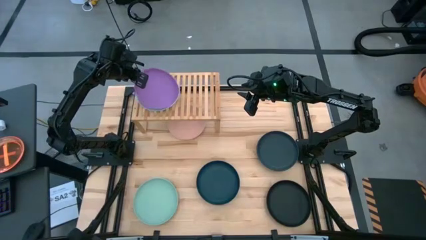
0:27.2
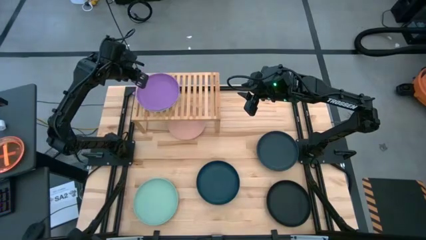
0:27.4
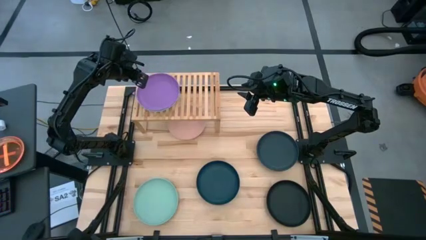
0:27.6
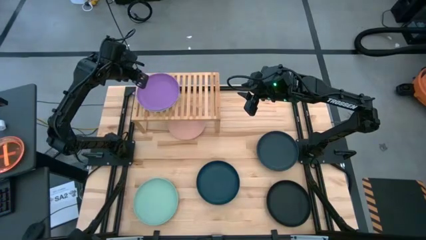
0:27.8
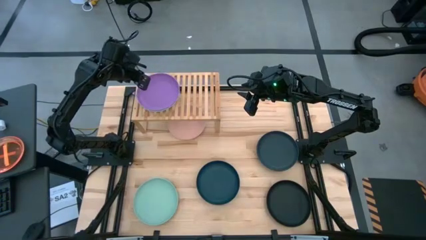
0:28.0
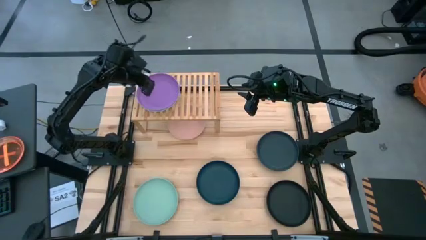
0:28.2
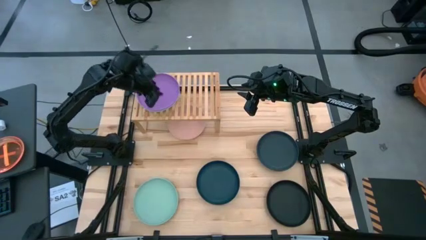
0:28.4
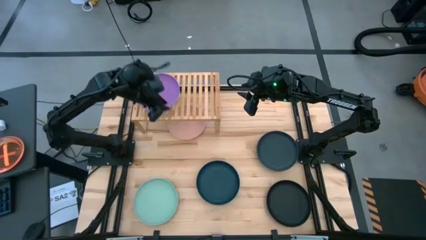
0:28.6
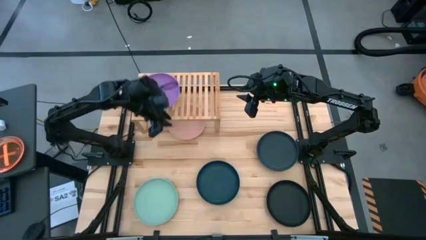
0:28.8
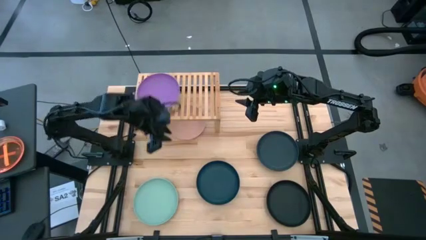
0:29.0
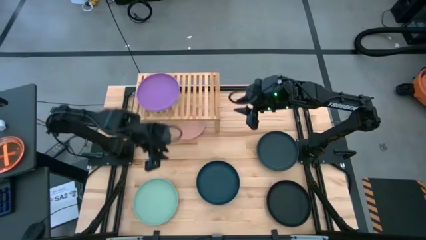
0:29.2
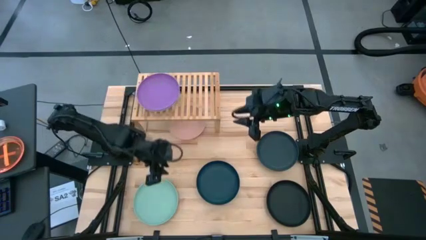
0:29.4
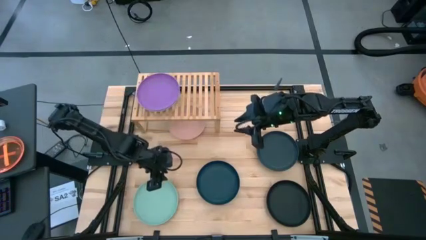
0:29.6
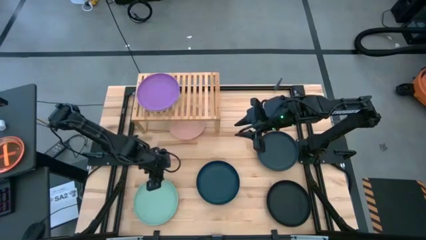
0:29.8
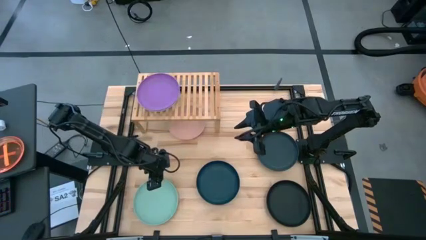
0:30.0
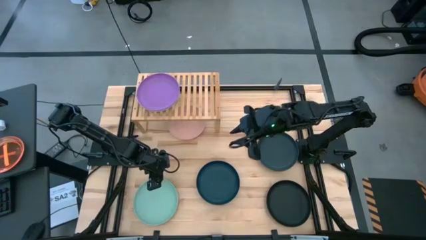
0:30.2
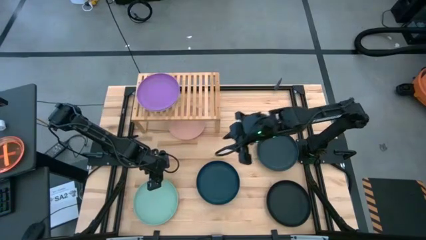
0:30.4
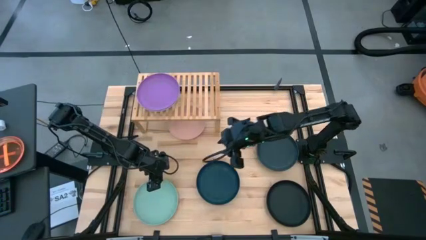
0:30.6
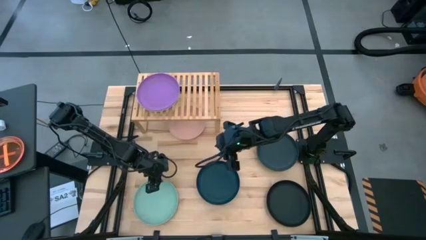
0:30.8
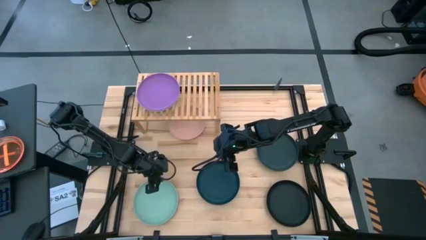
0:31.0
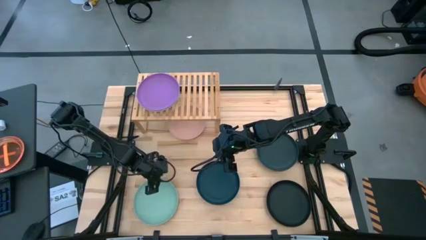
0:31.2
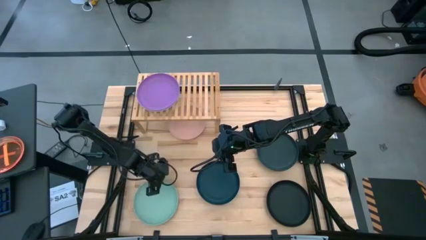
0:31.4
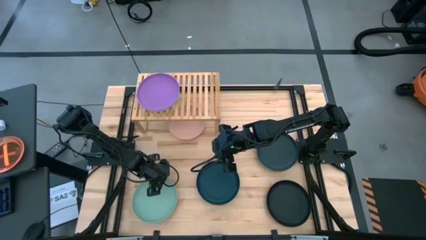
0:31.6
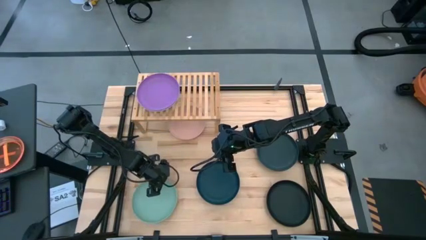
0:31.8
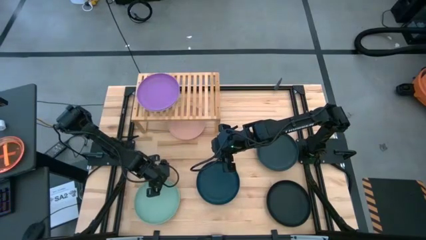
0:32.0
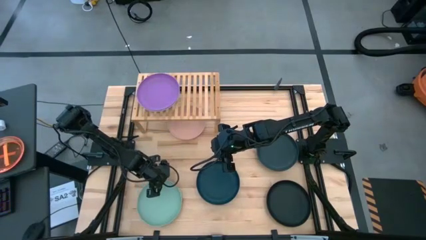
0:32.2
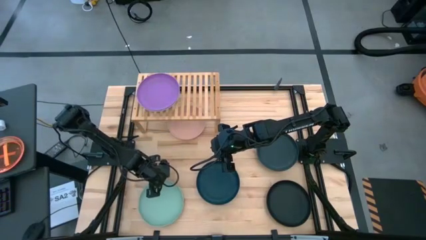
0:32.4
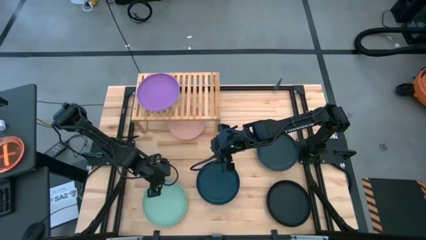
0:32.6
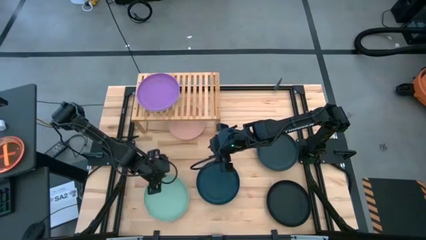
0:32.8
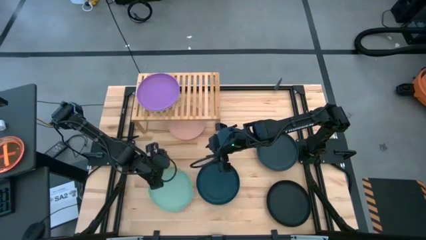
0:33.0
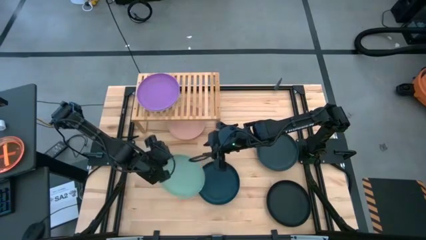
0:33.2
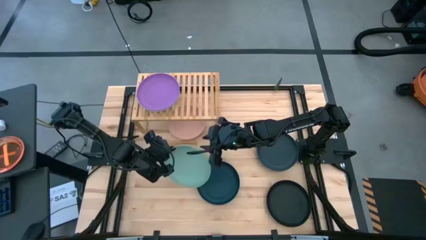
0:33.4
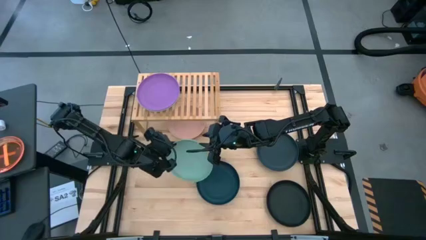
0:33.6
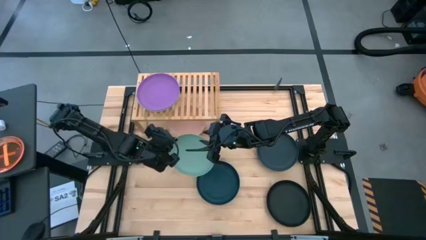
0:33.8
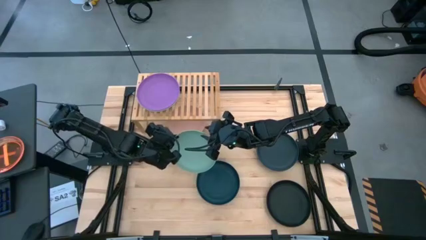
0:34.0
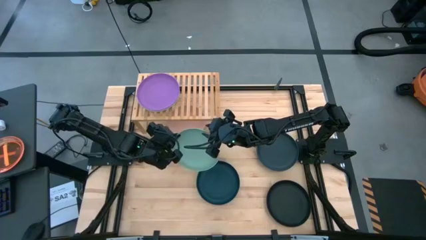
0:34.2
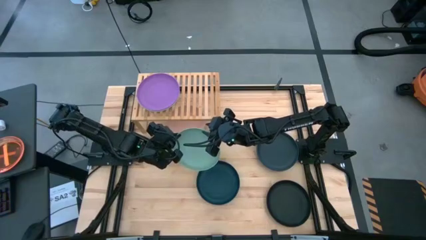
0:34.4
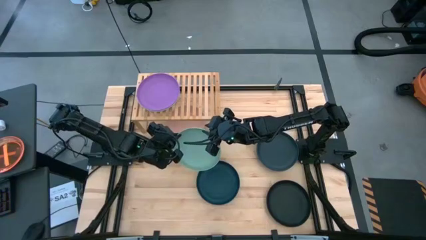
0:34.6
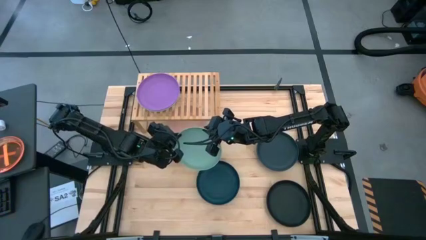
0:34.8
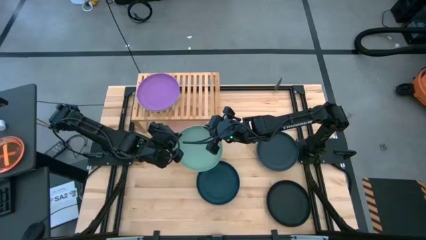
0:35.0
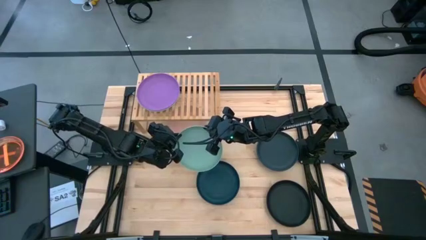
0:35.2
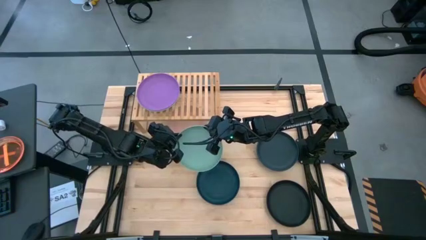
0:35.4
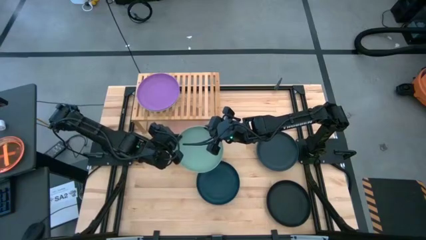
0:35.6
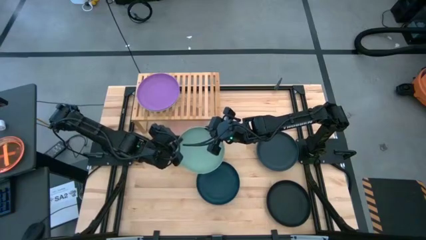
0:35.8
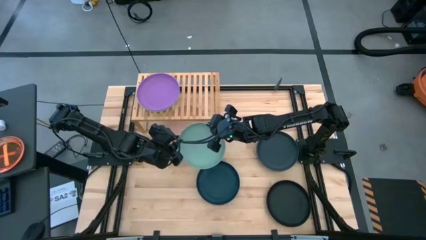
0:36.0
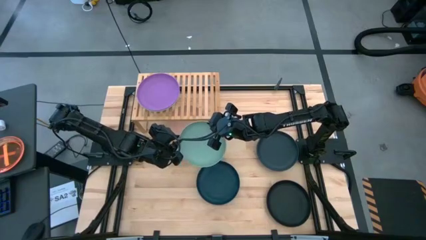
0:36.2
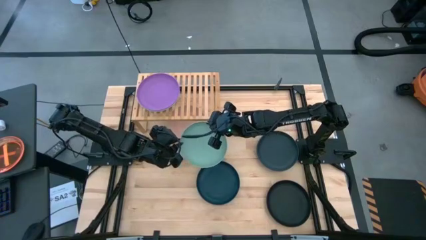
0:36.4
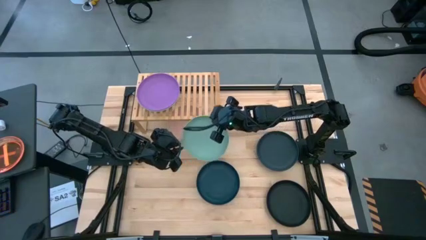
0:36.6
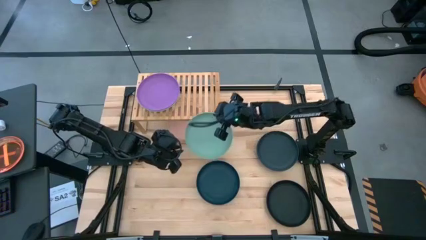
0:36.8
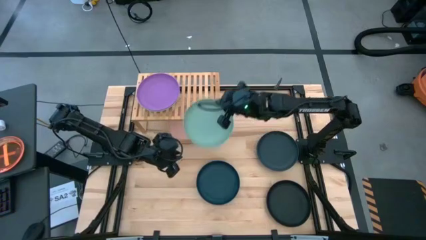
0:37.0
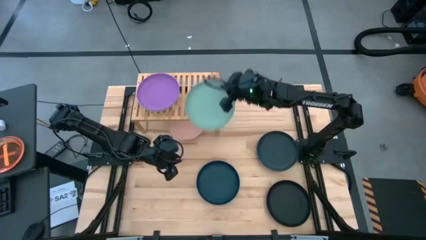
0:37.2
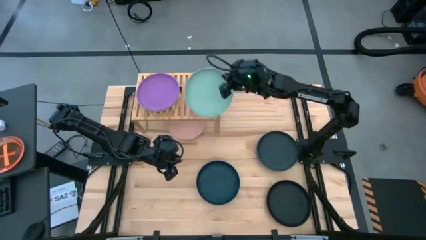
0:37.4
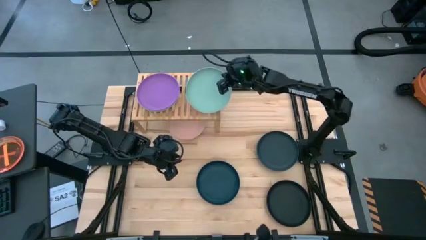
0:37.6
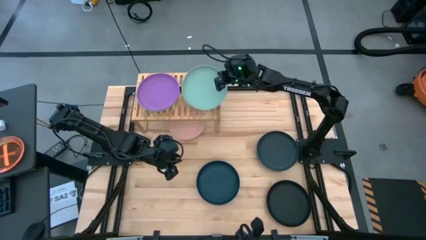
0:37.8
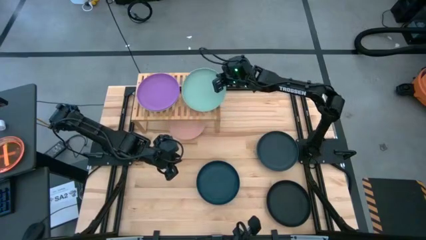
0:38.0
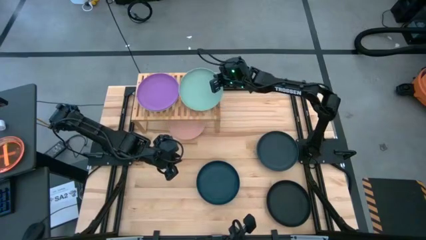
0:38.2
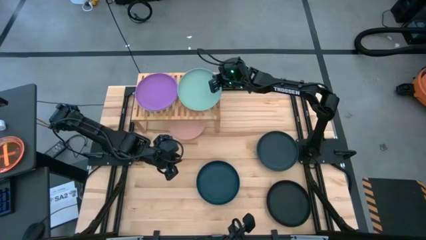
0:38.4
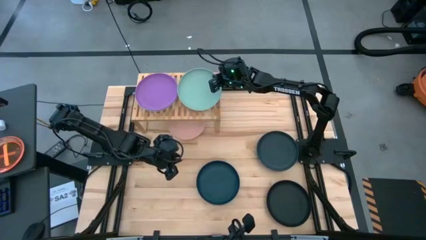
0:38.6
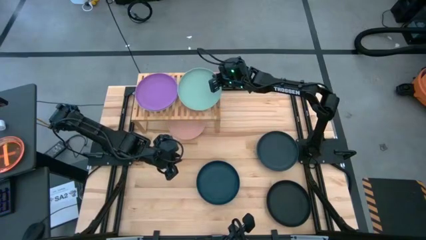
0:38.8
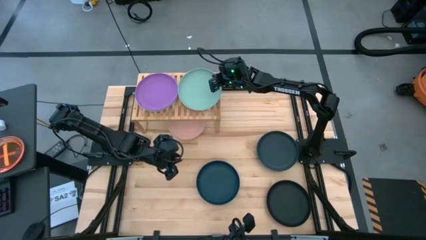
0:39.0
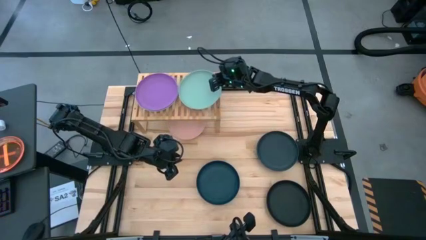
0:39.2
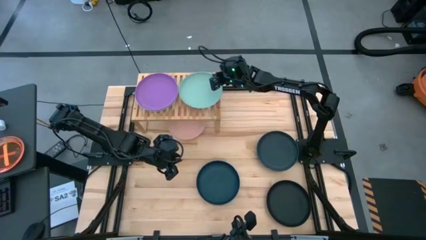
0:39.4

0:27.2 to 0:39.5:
Task: Place and stack plates onto a shelf
Put the light green plate on the shelf

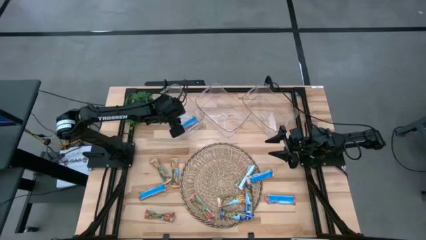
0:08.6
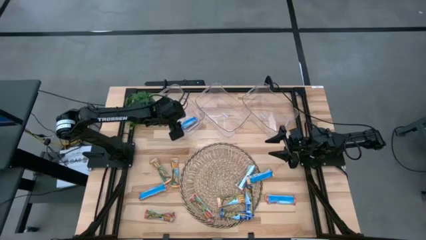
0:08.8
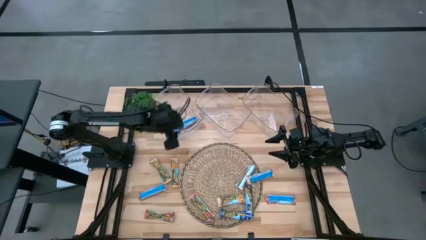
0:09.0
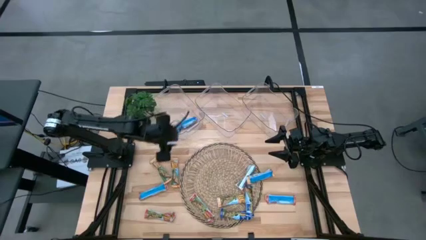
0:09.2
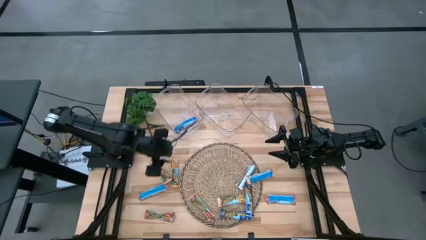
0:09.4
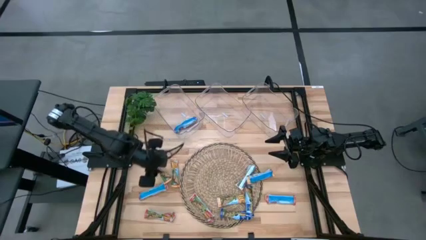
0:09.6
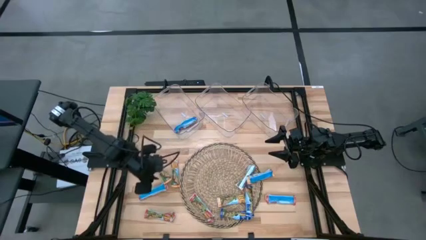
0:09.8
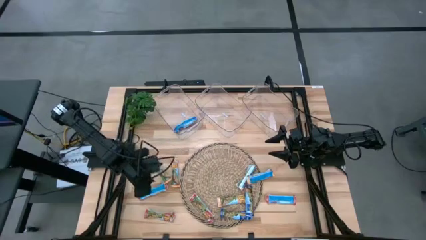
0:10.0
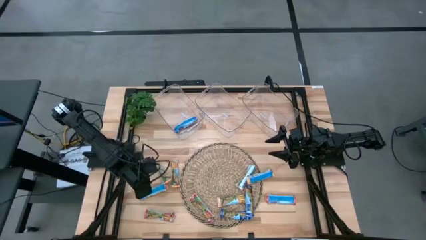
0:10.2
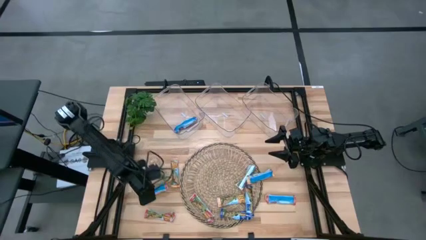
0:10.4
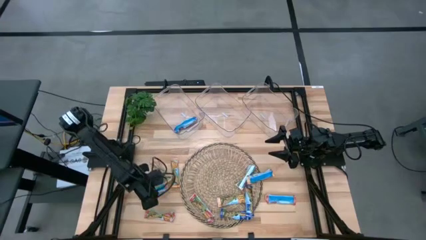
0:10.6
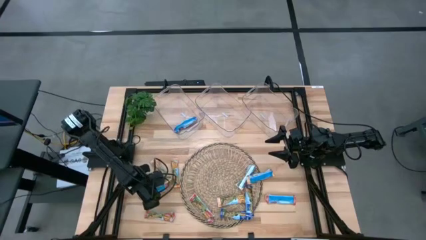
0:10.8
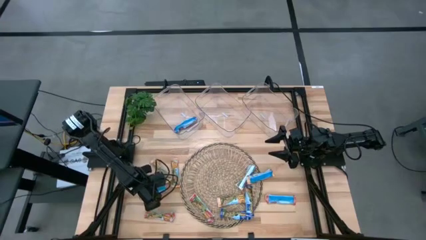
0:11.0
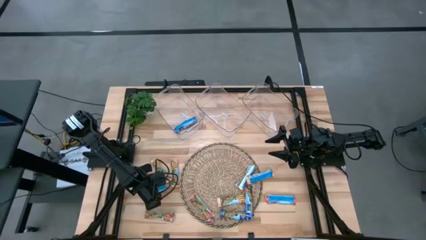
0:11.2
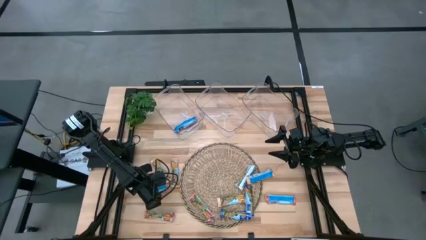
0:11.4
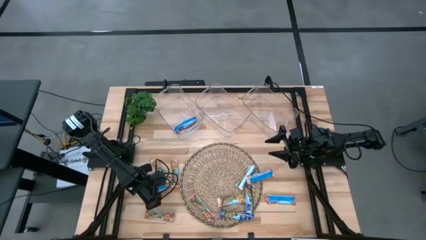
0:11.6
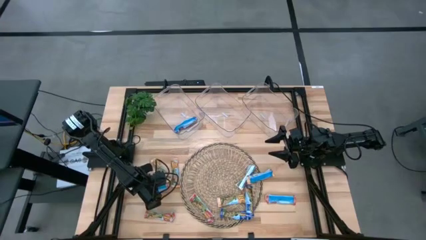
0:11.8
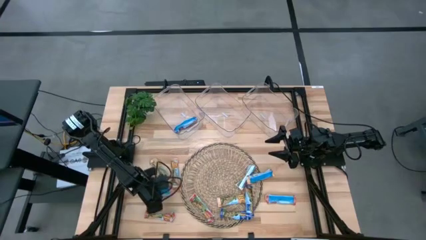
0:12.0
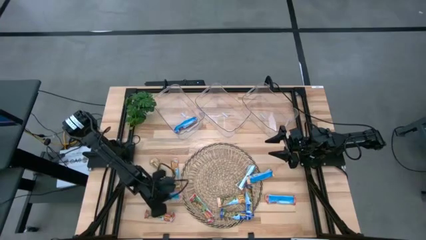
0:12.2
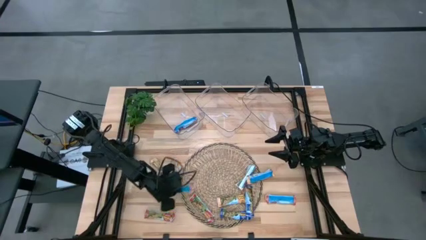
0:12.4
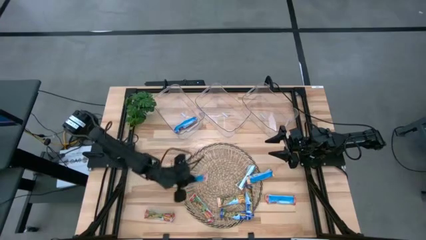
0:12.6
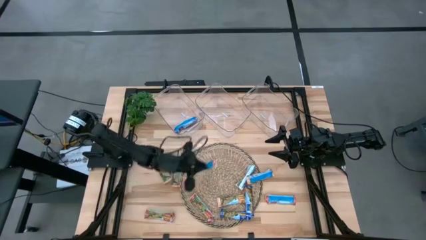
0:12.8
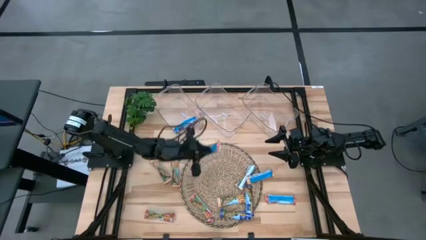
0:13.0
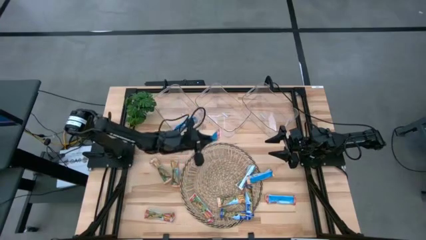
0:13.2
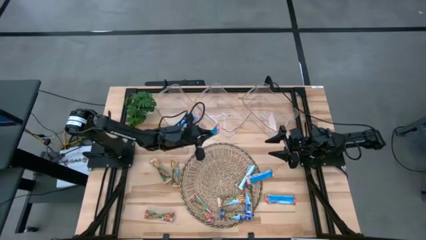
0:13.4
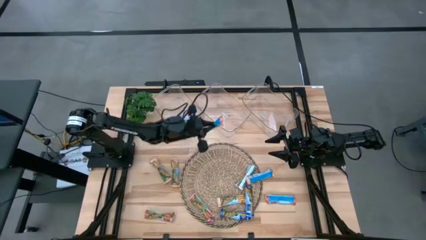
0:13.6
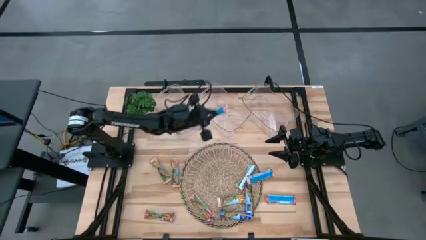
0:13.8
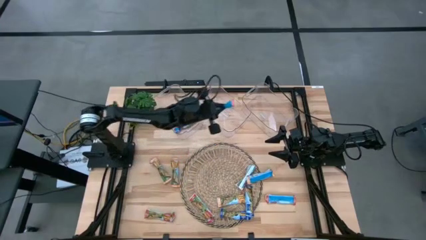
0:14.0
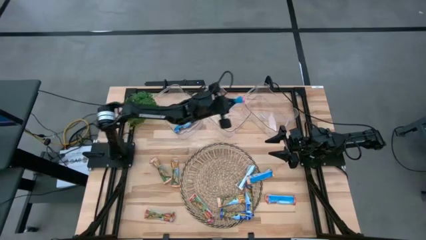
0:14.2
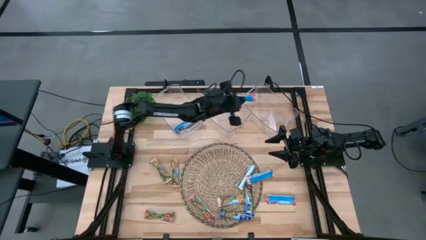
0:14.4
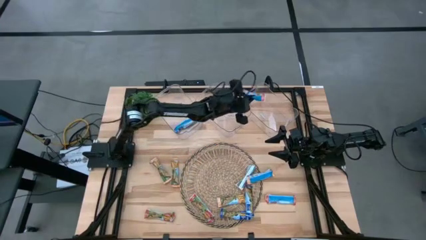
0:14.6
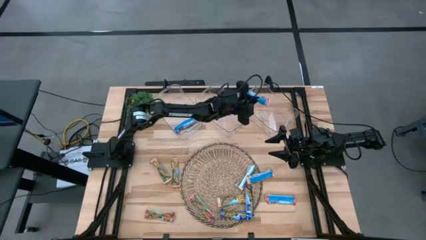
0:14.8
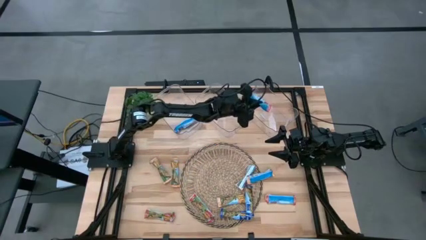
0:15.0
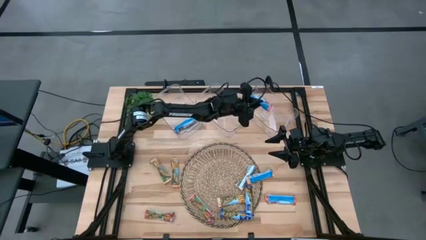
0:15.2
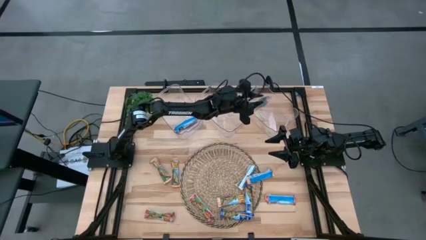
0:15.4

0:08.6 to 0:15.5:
Task: Pick and place Granola Bars by type
Put the red granola bar into the right transparent bin
